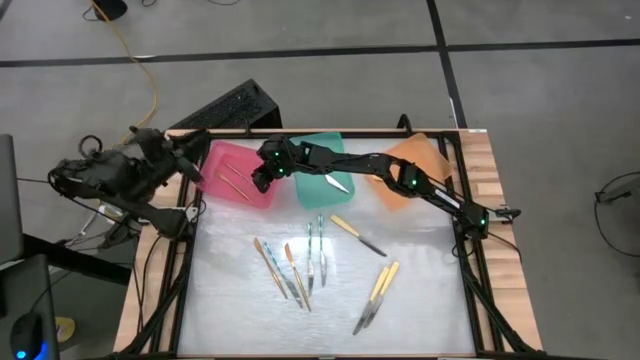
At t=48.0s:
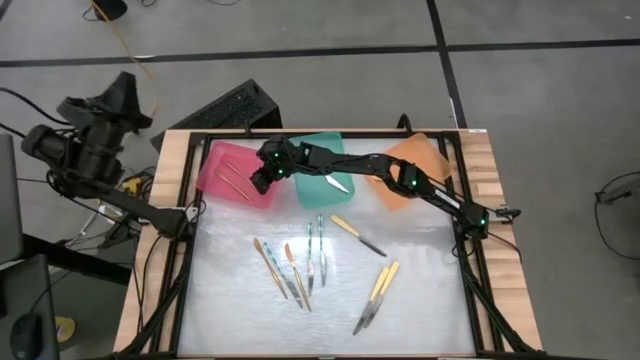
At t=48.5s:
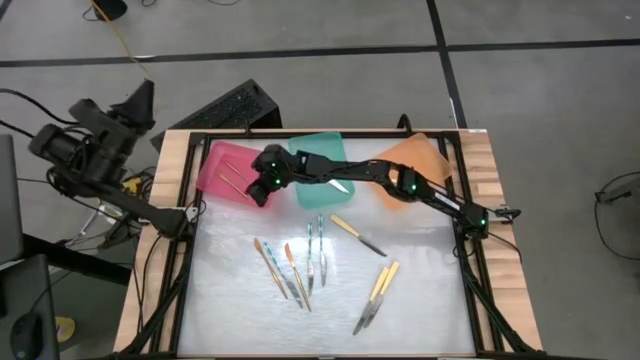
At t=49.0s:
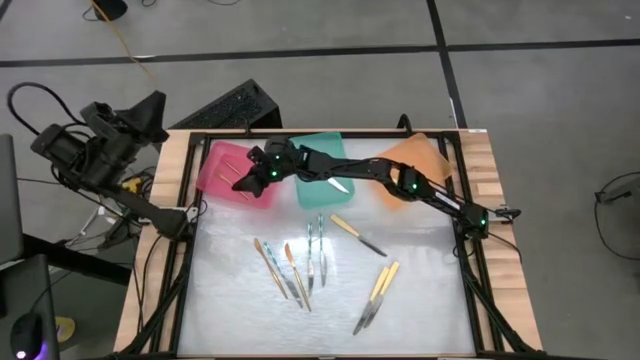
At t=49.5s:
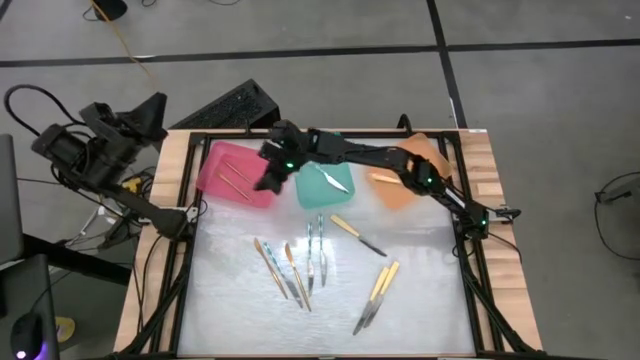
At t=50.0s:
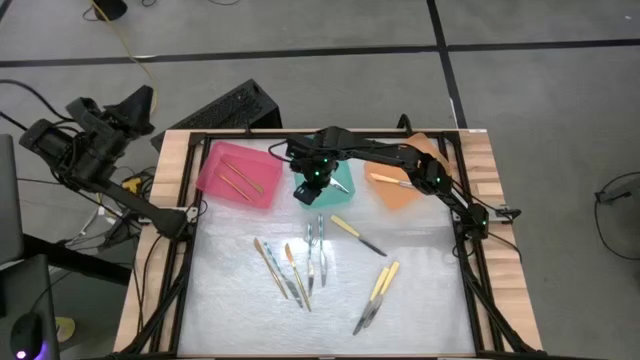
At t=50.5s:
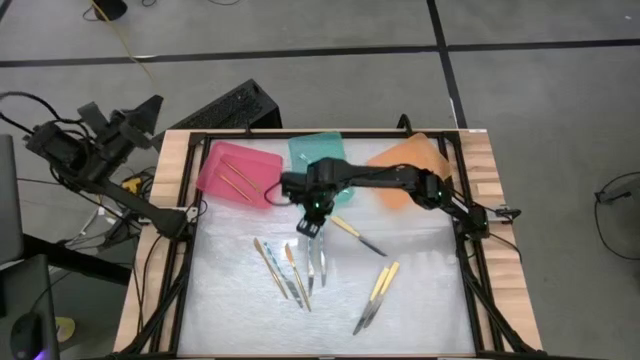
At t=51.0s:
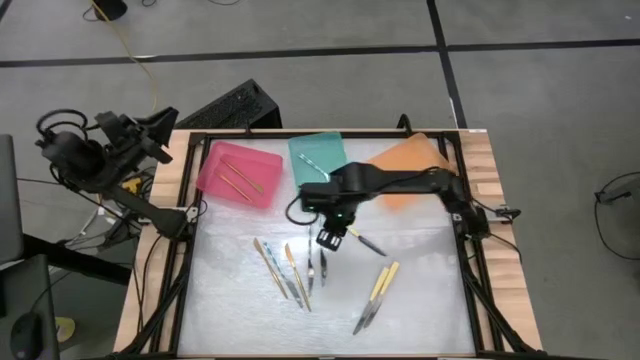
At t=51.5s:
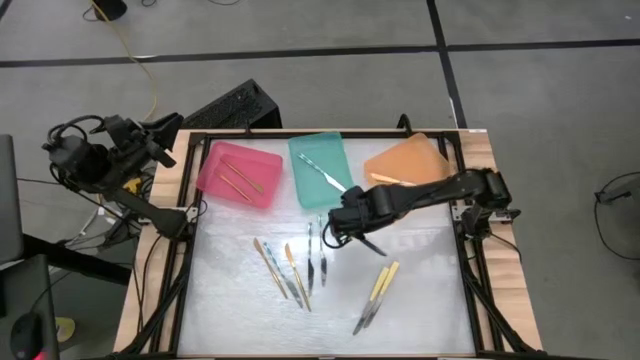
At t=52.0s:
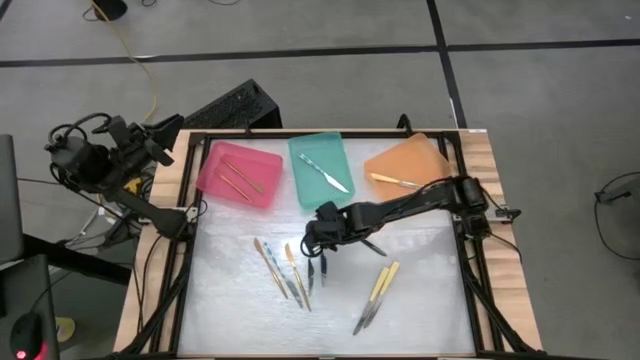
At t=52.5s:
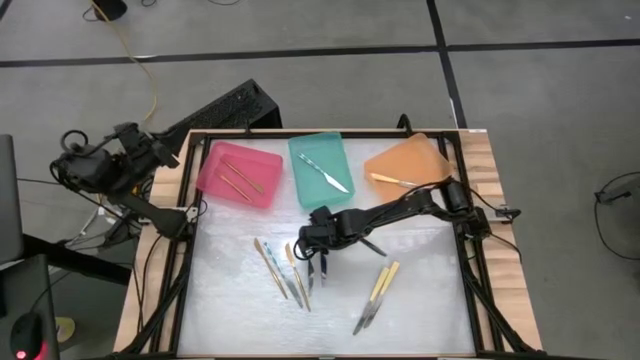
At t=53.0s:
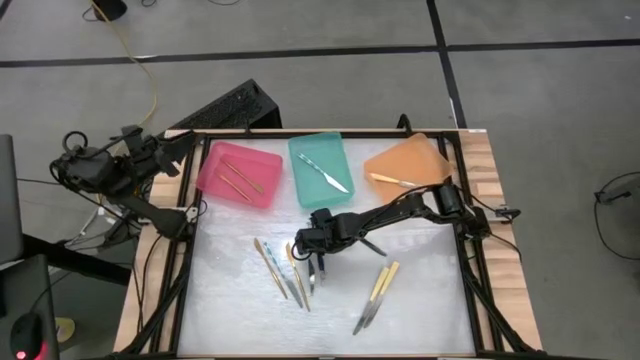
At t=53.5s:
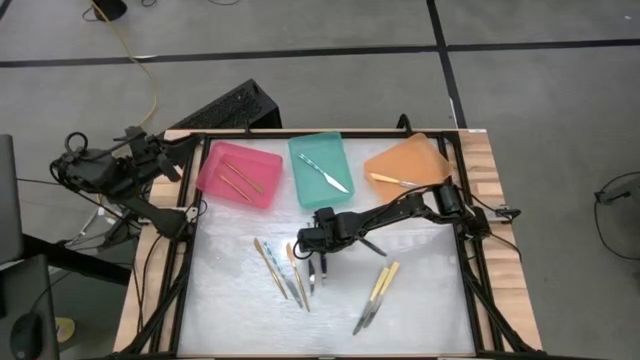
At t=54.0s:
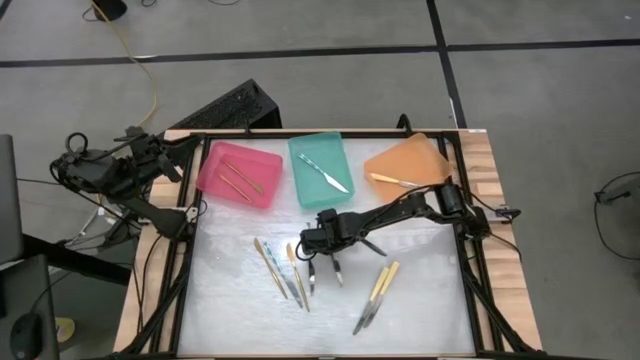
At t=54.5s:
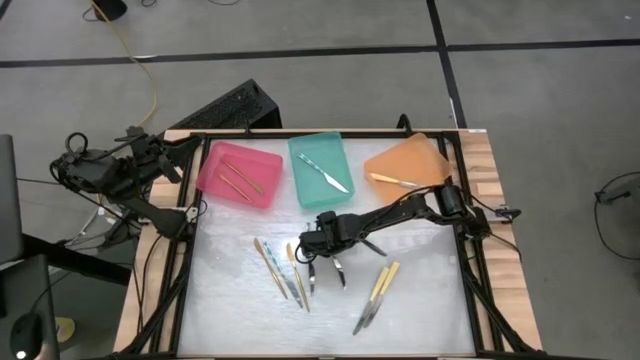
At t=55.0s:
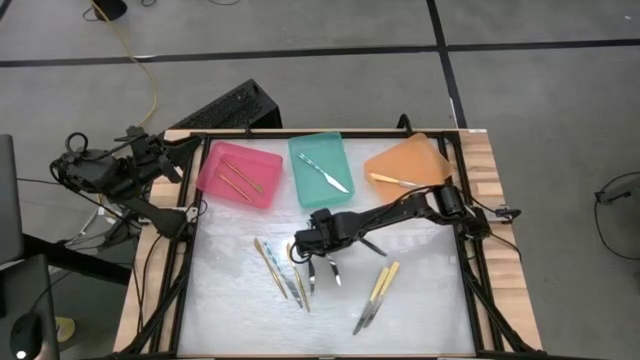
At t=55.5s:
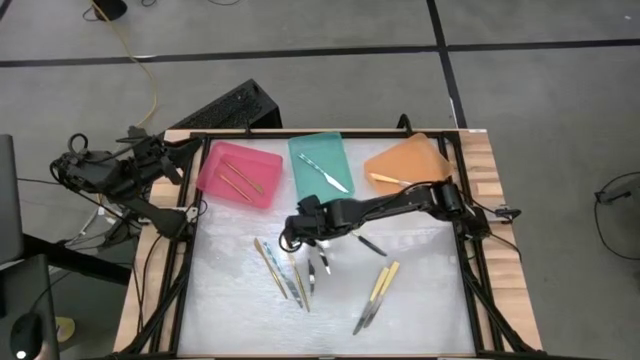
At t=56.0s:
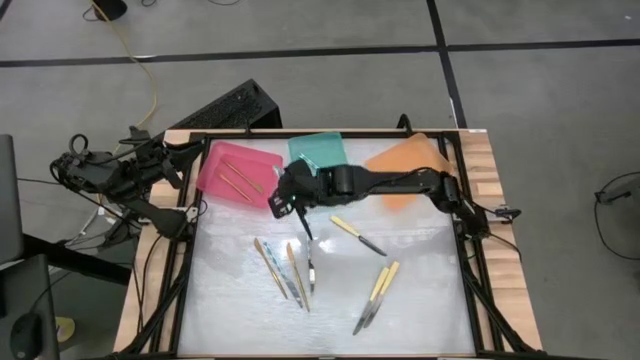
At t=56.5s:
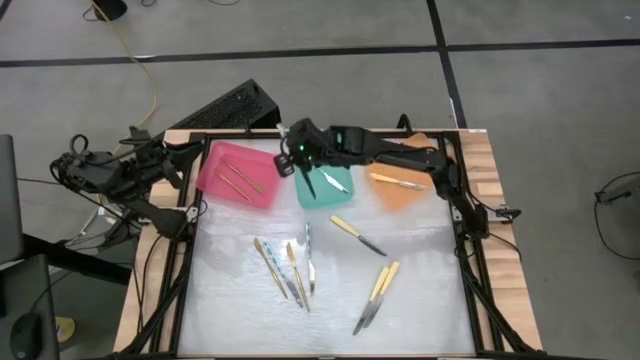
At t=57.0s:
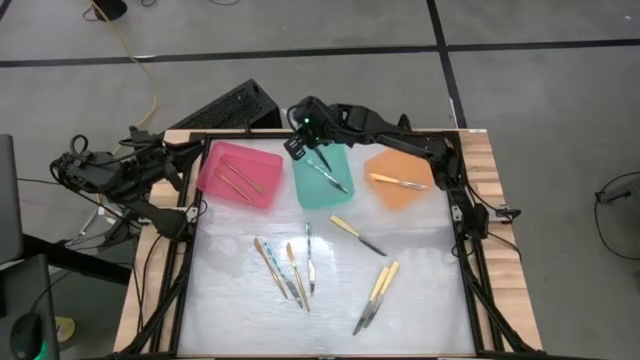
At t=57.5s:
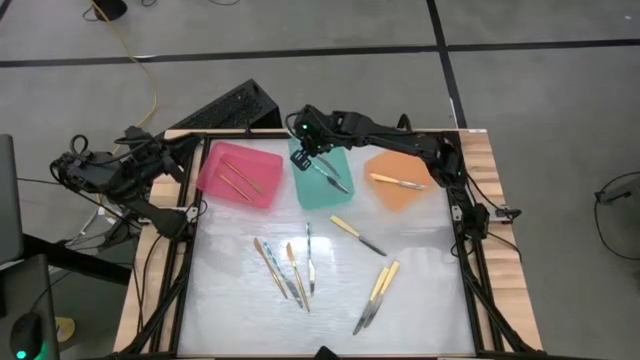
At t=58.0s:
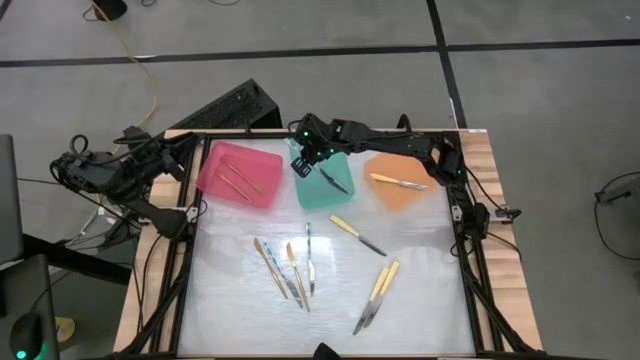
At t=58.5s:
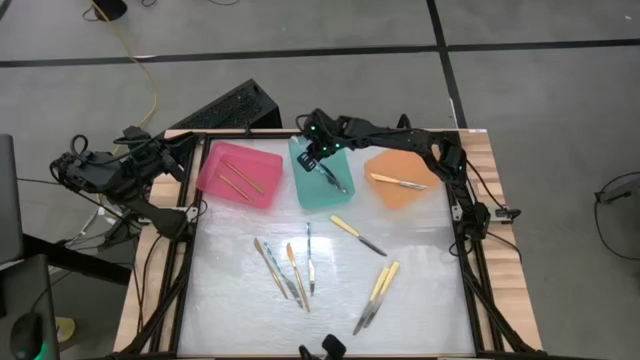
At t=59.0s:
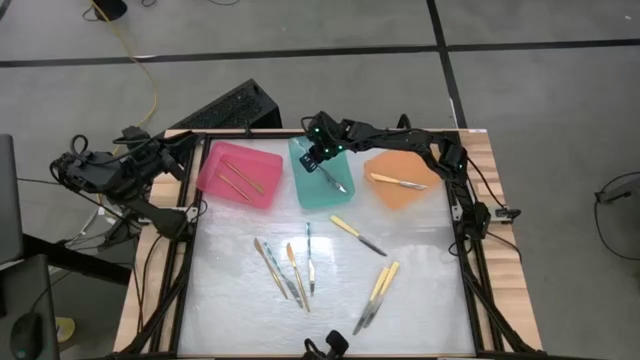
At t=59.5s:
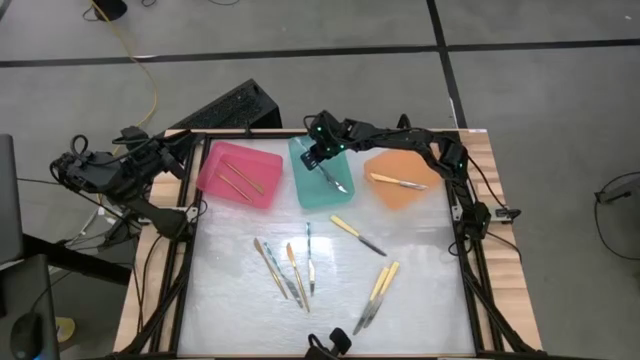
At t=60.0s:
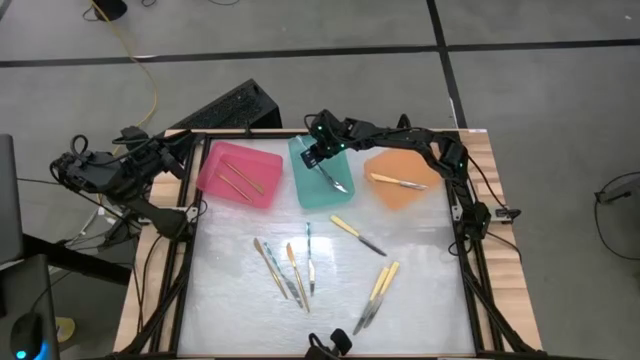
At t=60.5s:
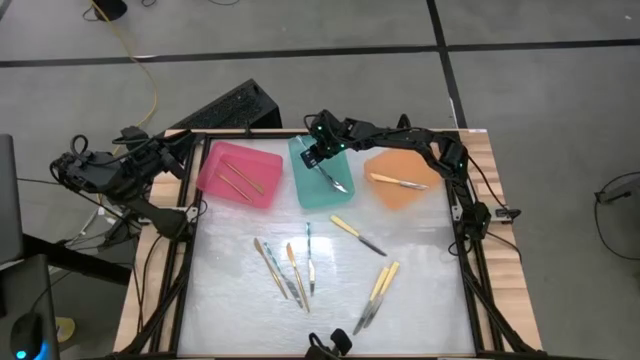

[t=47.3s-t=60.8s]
Task: Sort silverware by color (type)
Put the white and blue knife into the green bin

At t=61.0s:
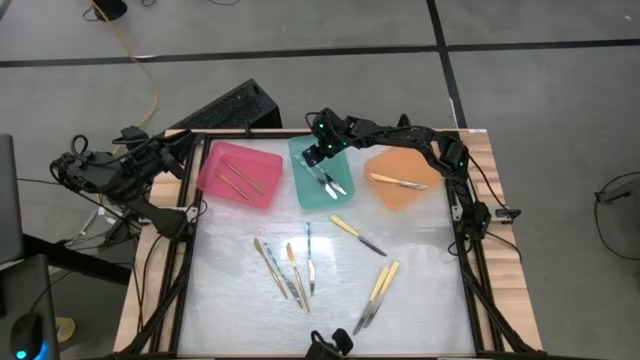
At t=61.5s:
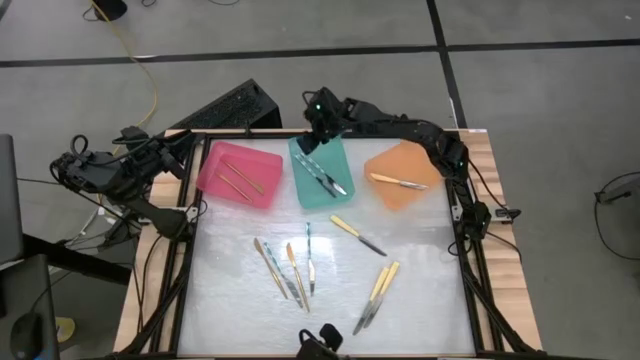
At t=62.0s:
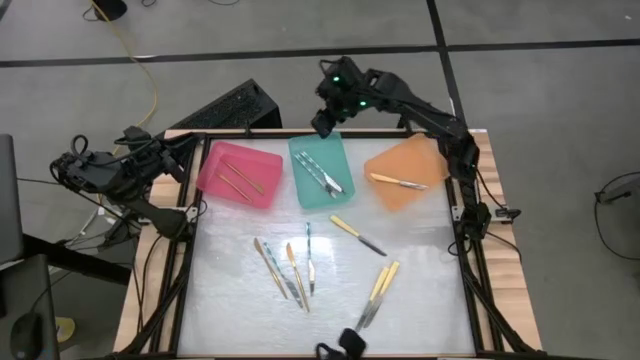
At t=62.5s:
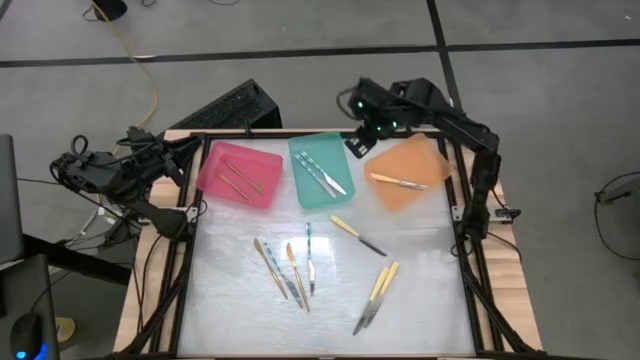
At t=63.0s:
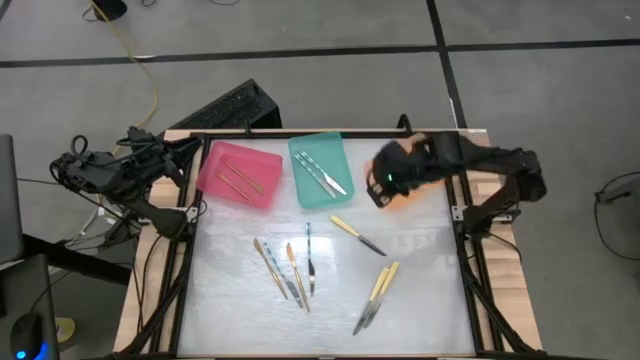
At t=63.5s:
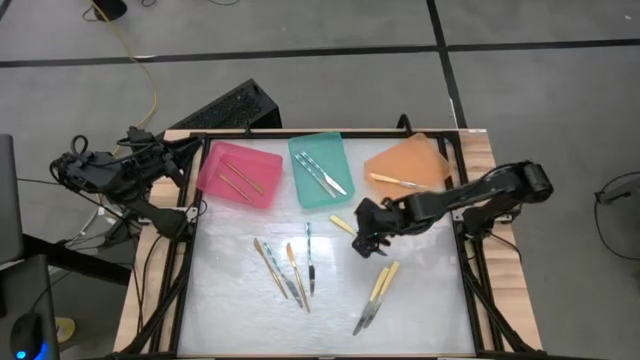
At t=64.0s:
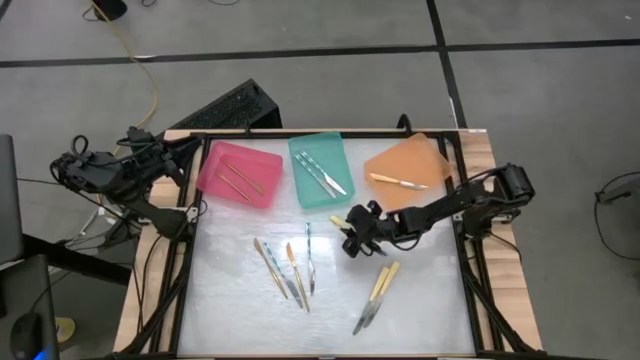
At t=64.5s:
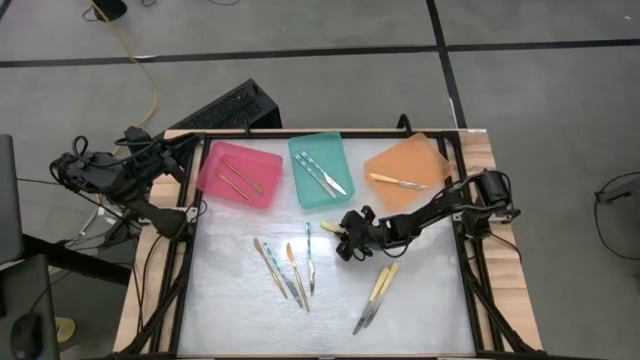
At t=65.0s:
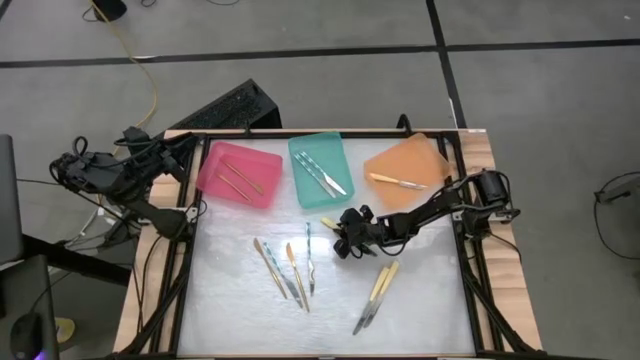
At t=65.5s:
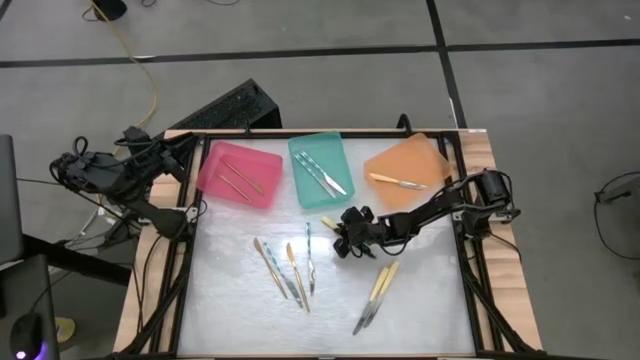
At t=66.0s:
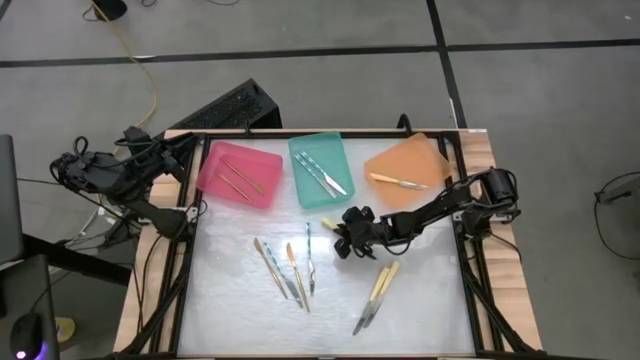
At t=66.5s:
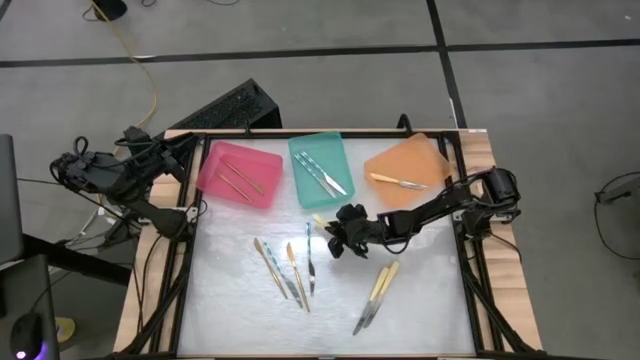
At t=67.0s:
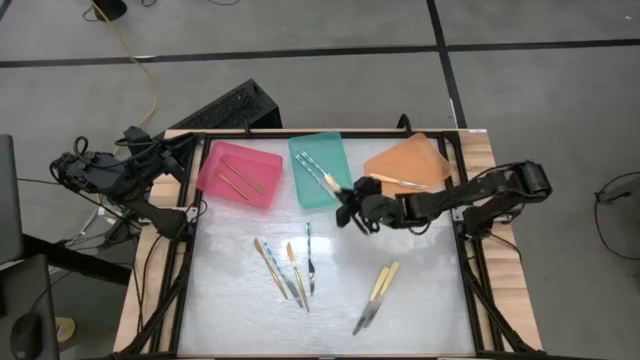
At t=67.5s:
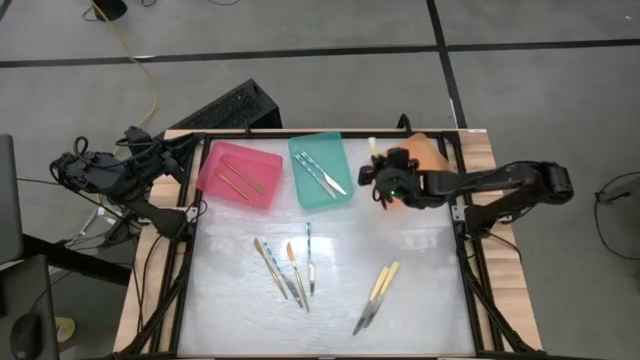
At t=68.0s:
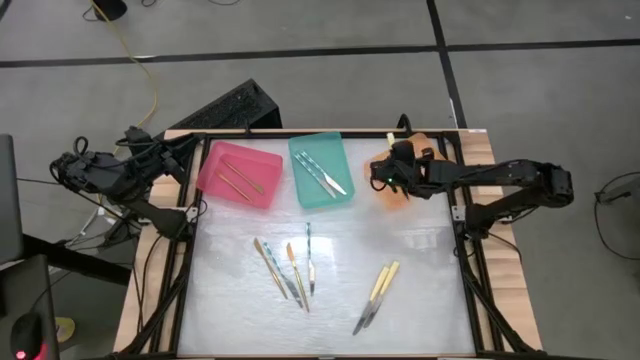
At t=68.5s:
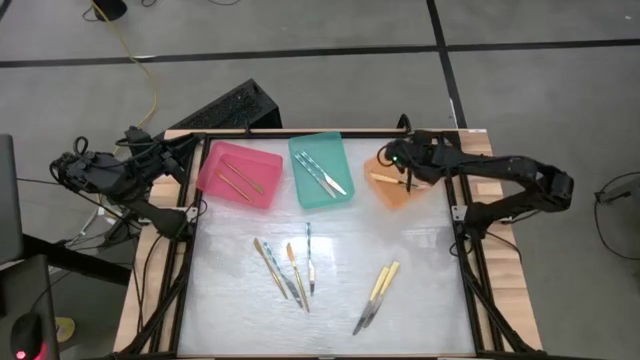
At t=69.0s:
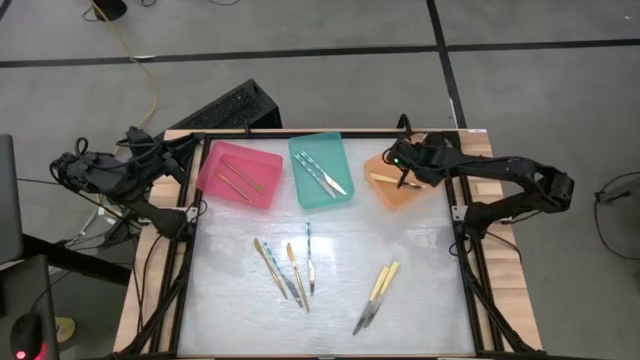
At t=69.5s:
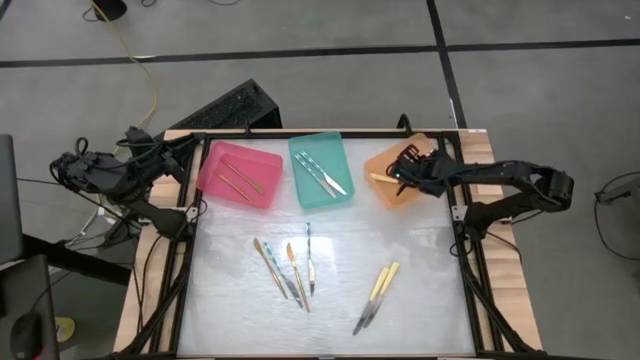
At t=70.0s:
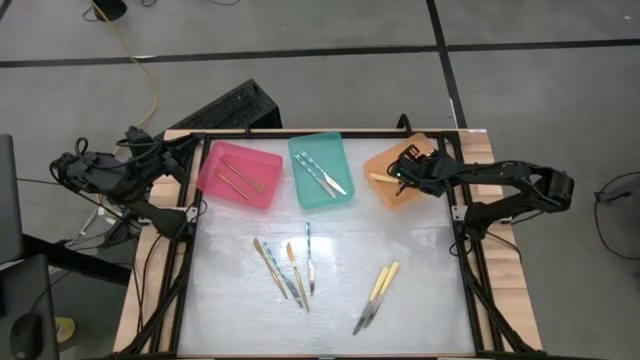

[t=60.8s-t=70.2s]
Put the yellow knife into the orange bin
